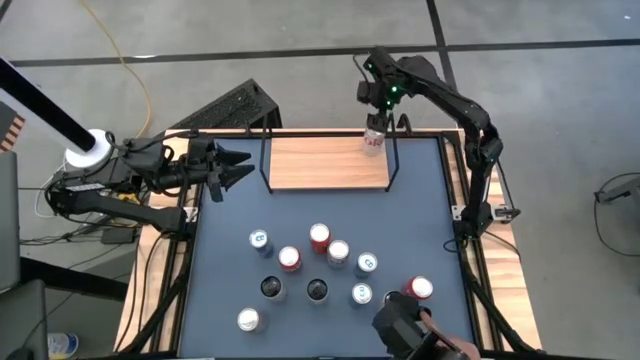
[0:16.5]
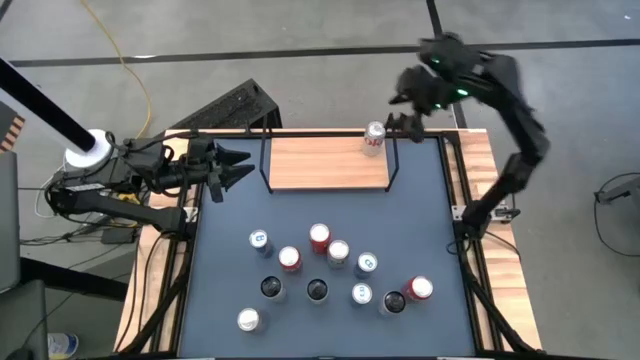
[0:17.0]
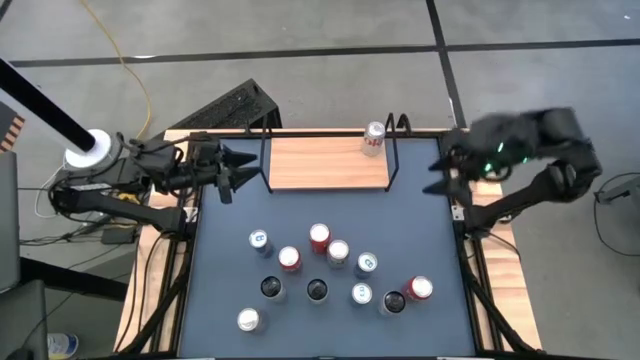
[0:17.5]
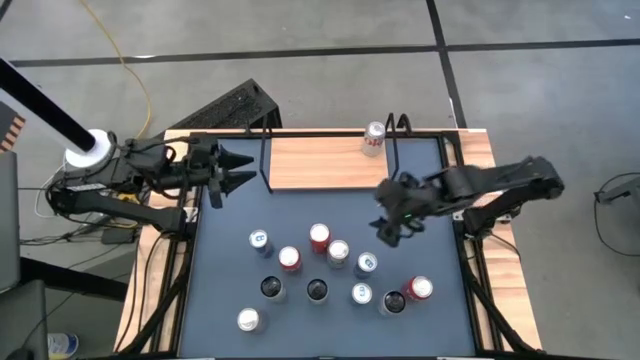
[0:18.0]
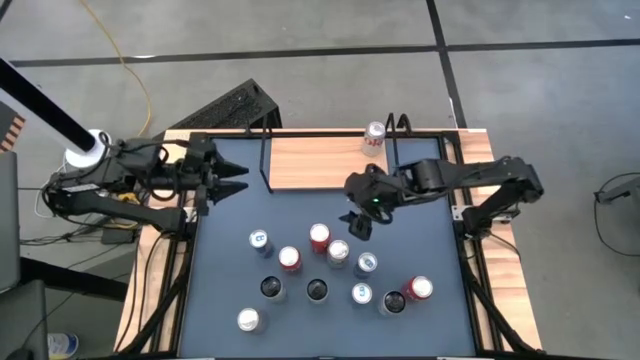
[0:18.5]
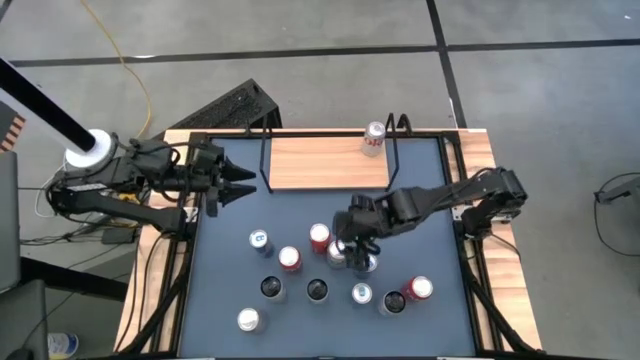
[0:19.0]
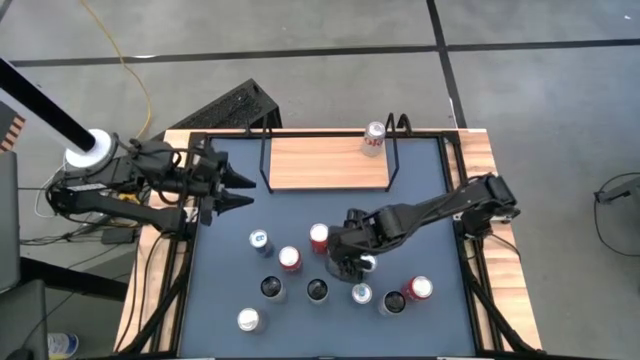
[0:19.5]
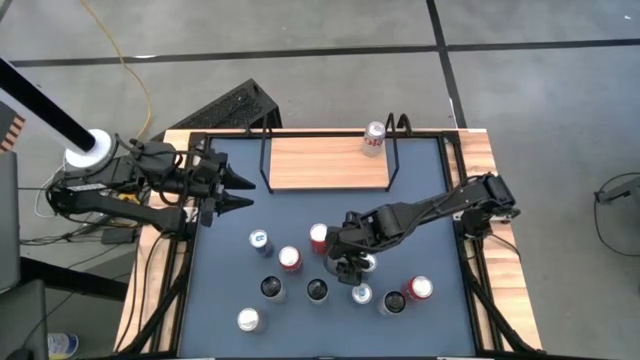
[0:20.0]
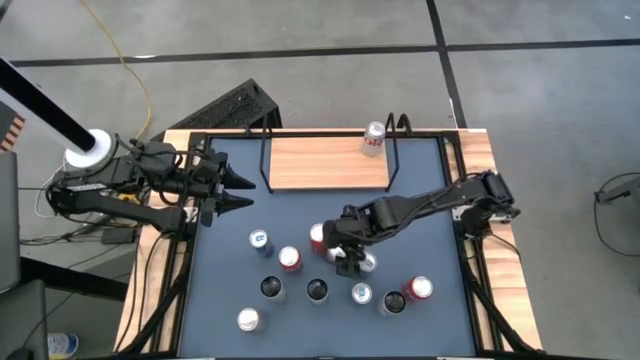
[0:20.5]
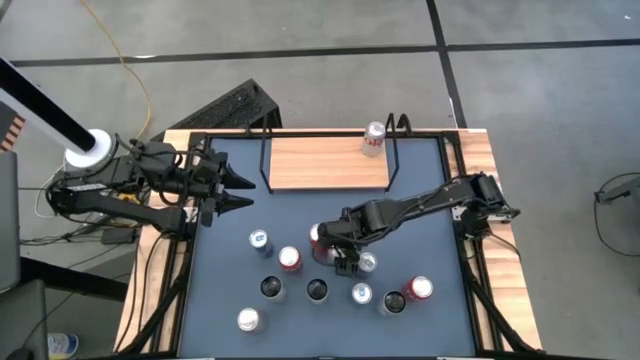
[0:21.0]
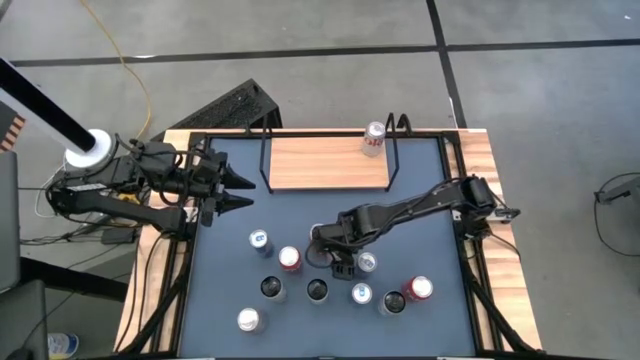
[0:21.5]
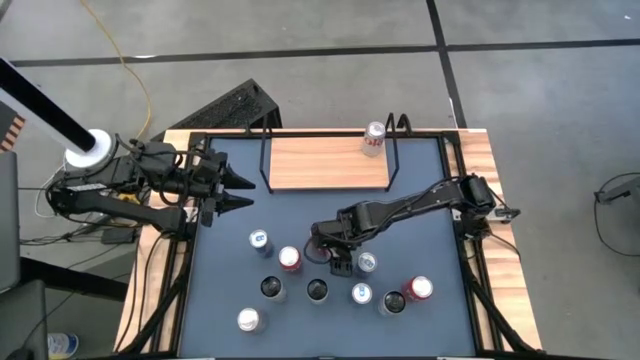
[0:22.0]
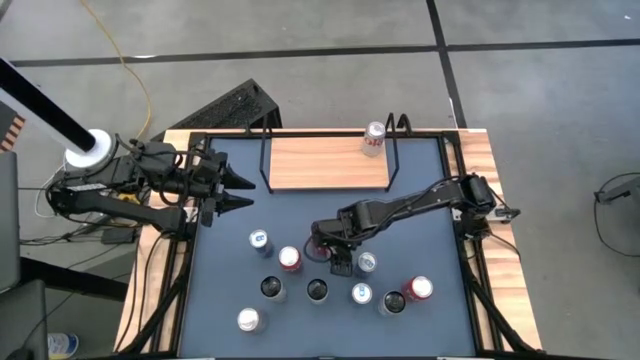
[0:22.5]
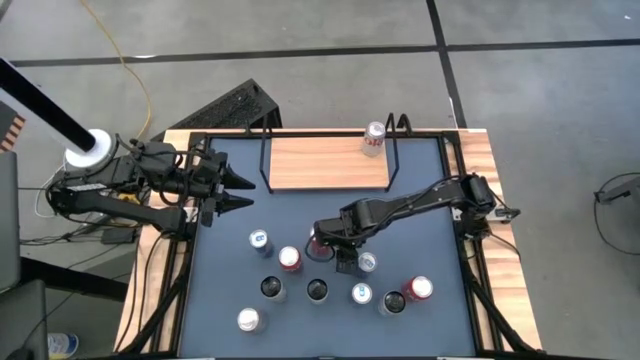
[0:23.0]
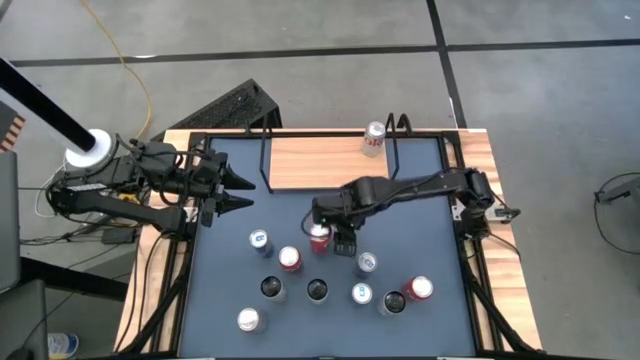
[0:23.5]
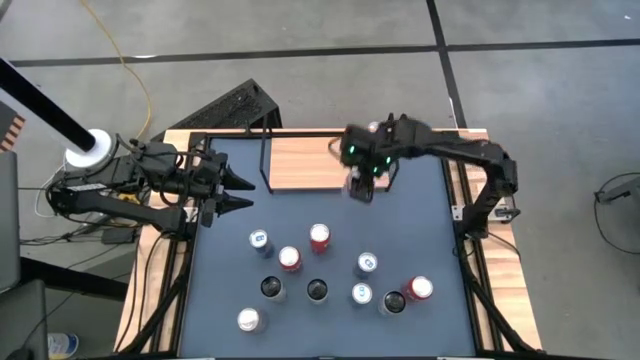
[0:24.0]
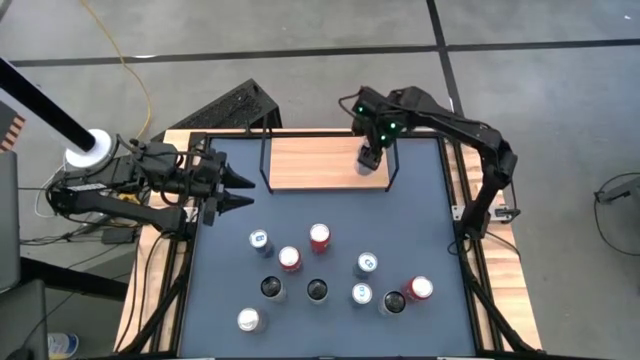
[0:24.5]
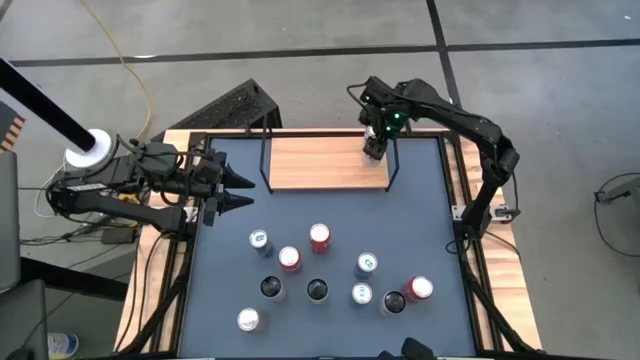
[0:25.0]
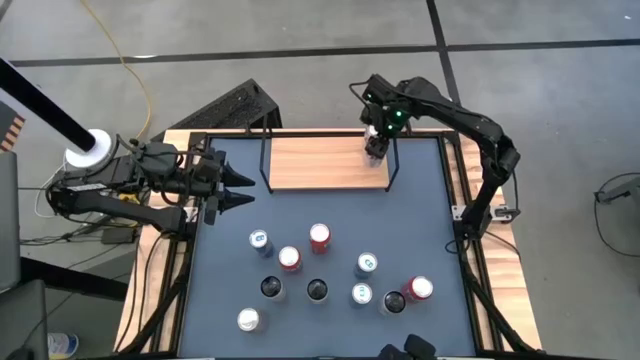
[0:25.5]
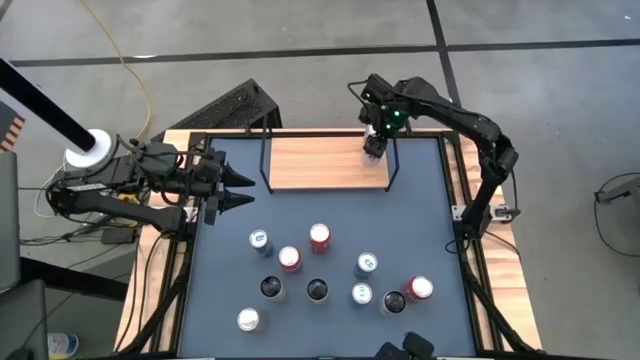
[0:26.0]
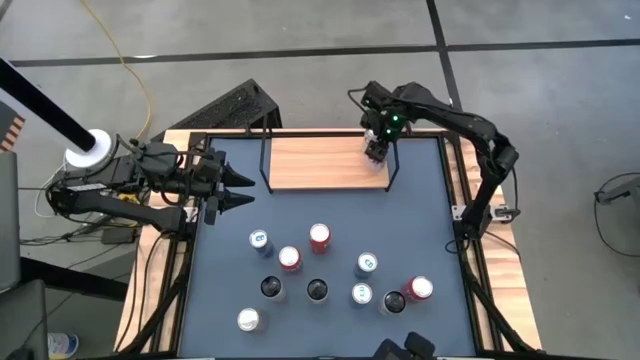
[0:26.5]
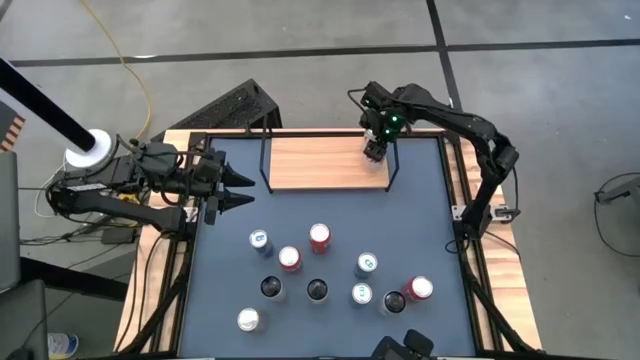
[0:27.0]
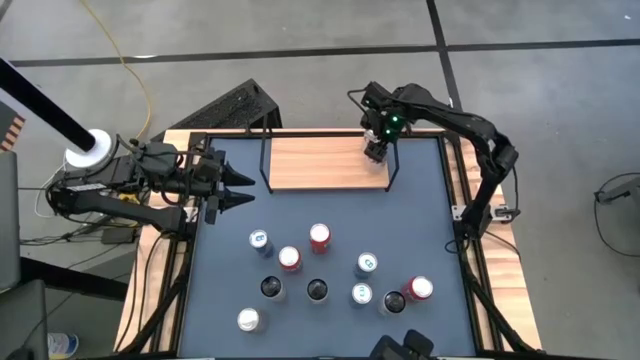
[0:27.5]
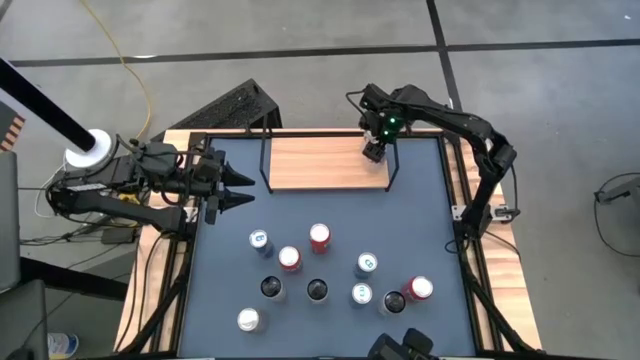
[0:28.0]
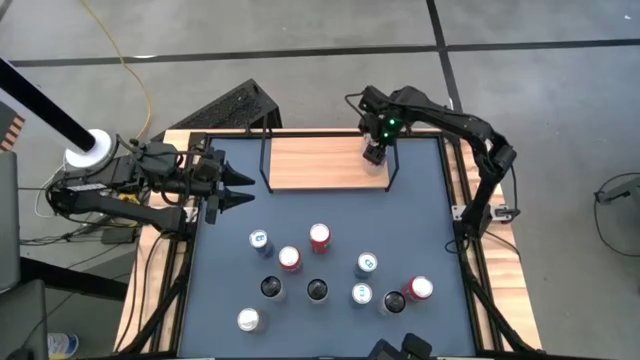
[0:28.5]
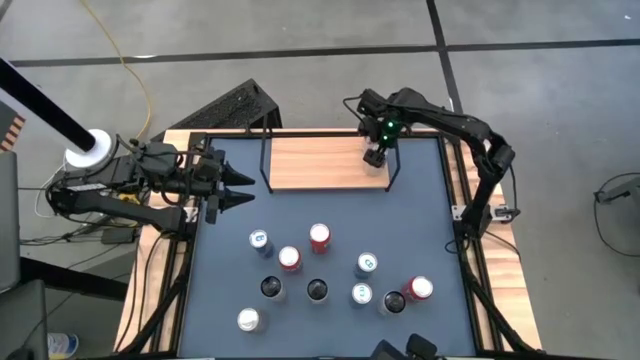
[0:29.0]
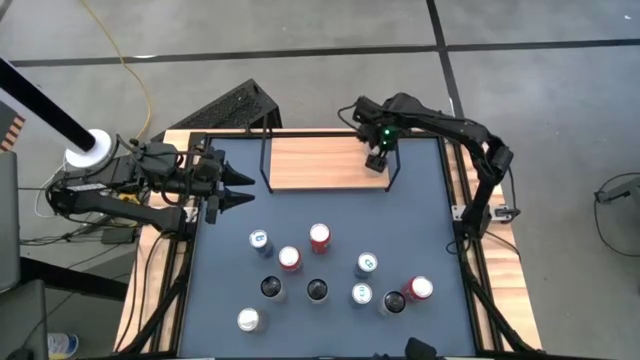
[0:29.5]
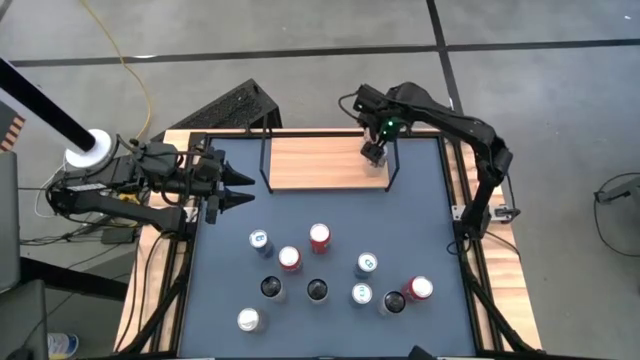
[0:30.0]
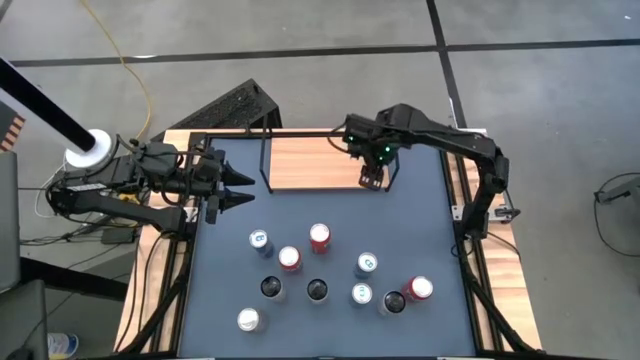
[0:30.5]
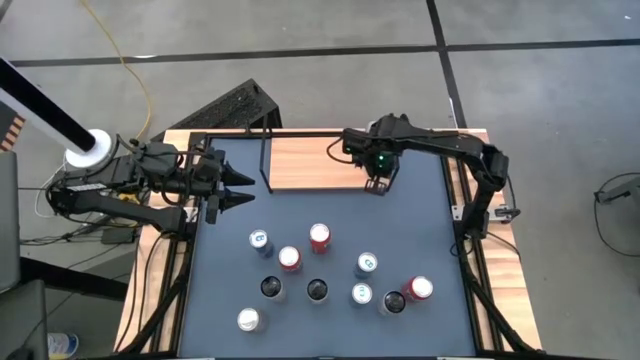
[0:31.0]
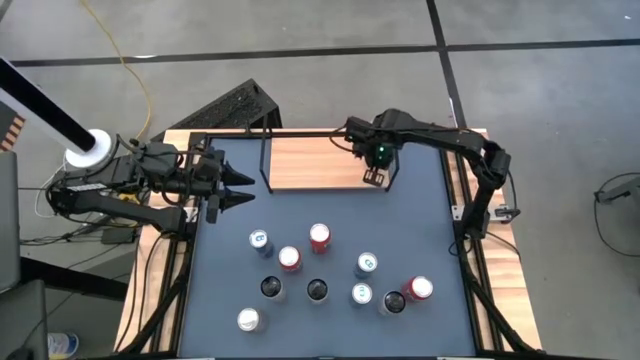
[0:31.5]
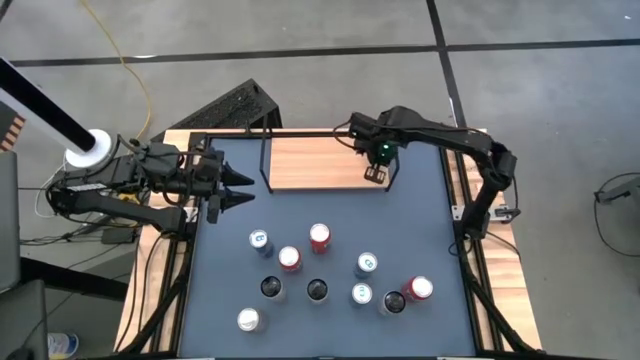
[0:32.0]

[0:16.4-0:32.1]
Task: Place canned beverage on shelf
Put the top silver soda can on the shelf aligned with the other silver soda can

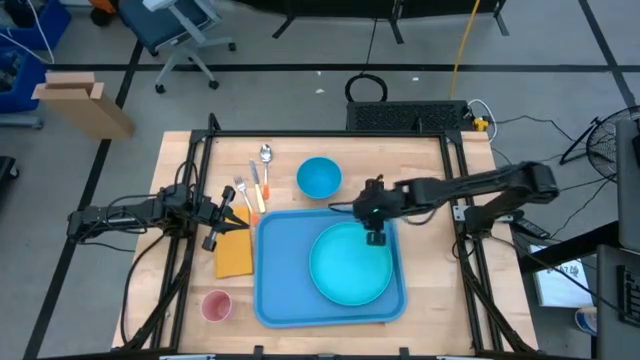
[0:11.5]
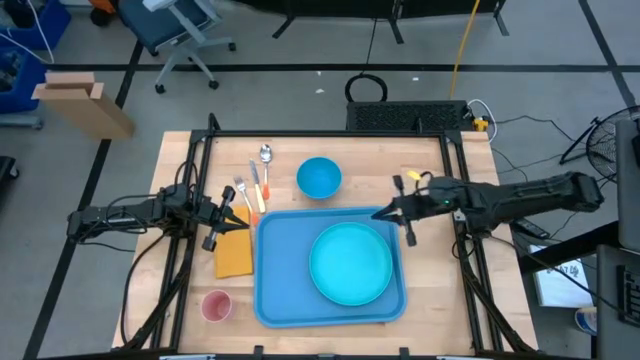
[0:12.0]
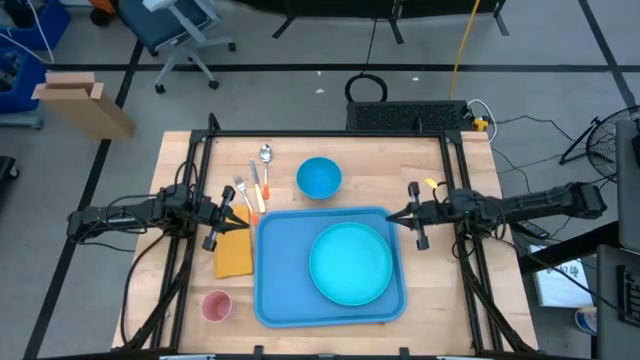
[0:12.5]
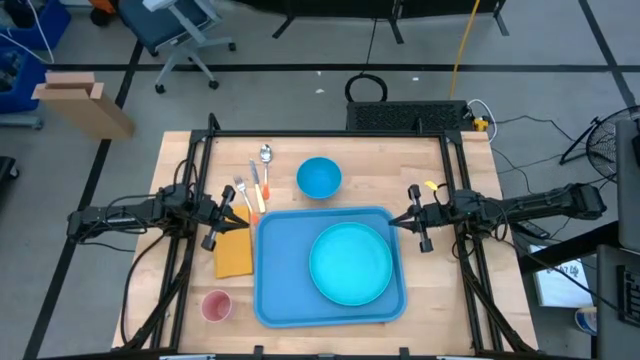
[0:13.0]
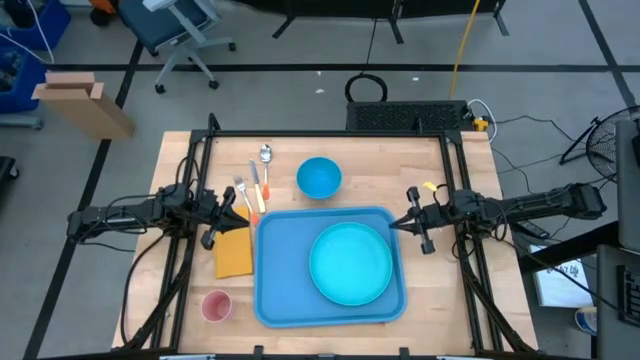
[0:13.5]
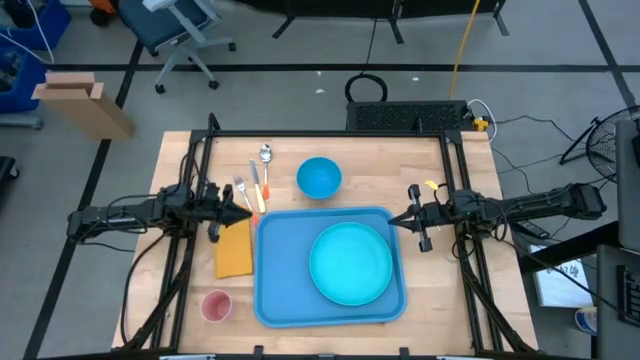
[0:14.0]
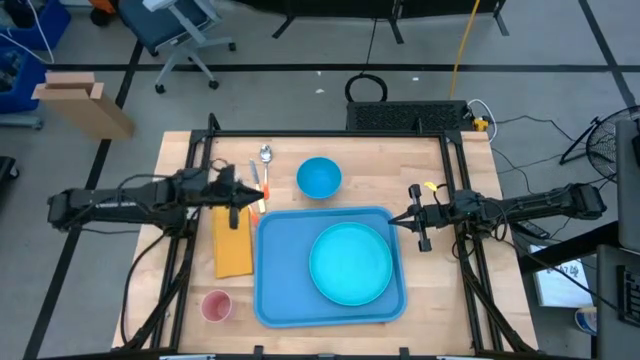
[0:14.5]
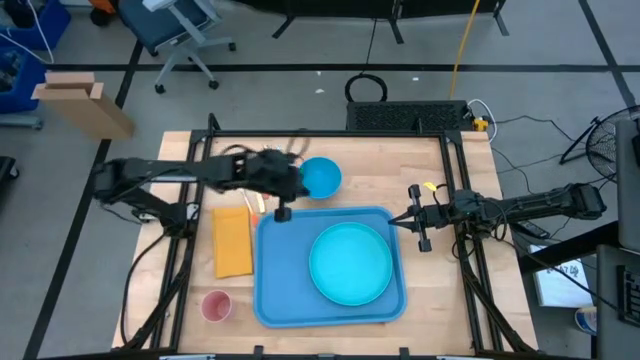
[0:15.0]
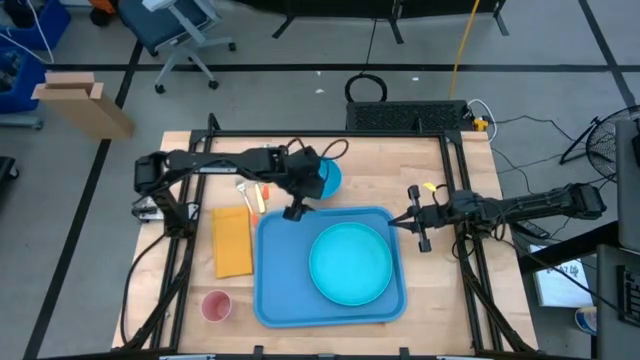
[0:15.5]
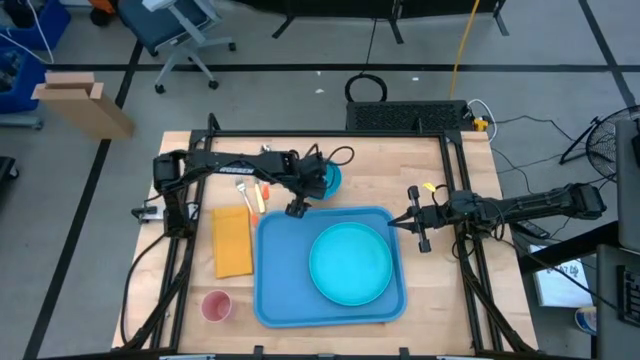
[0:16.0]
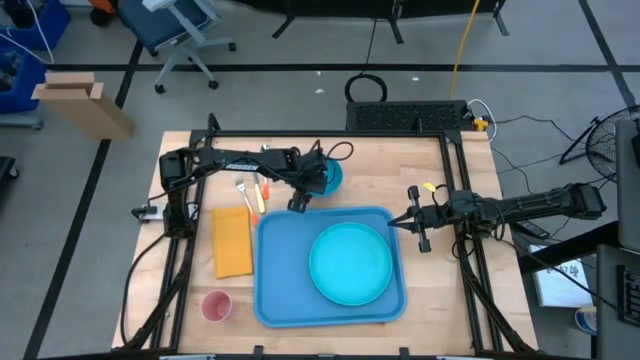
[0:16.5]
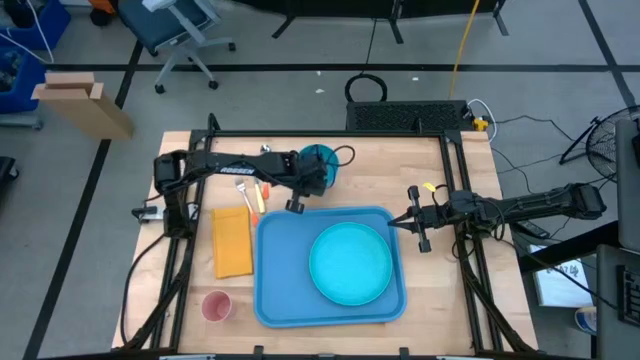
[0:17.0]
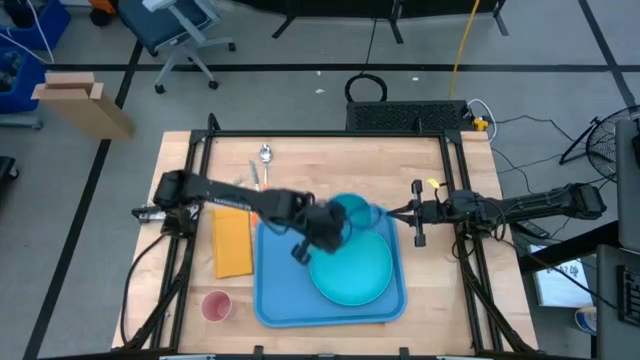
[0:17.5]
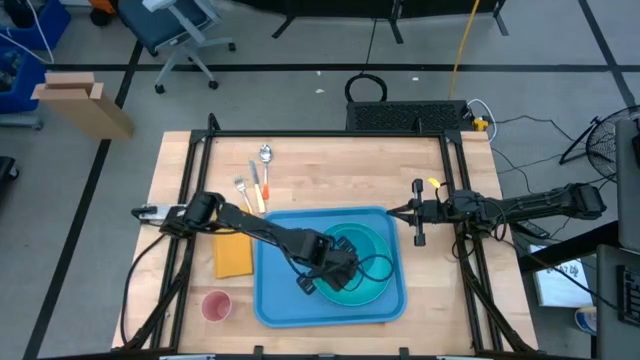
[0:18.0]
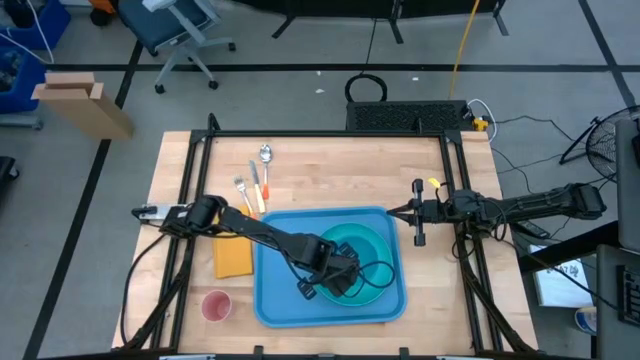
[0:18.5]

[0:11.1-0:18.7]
Task: Set up tray
Put the blue bowl on the light green plate
